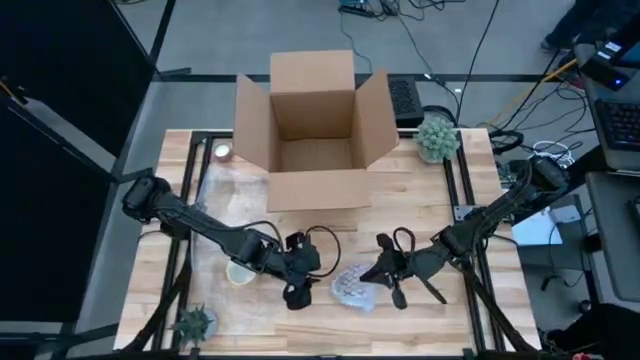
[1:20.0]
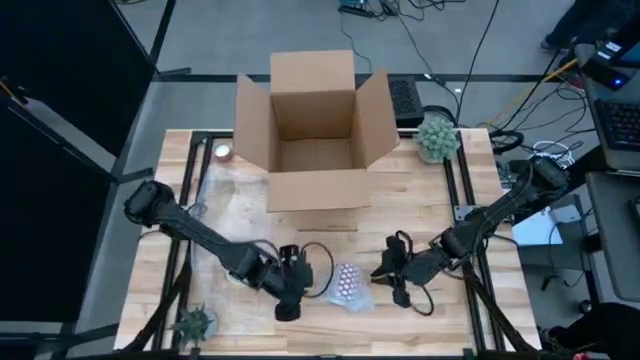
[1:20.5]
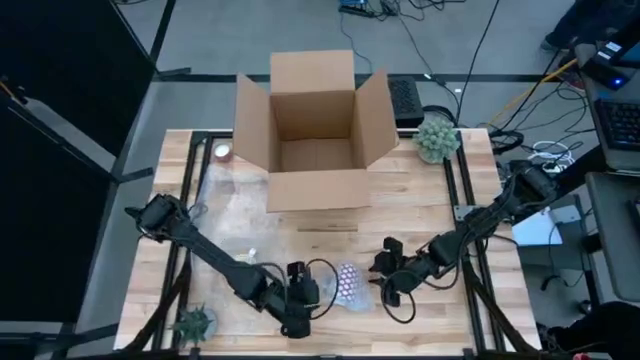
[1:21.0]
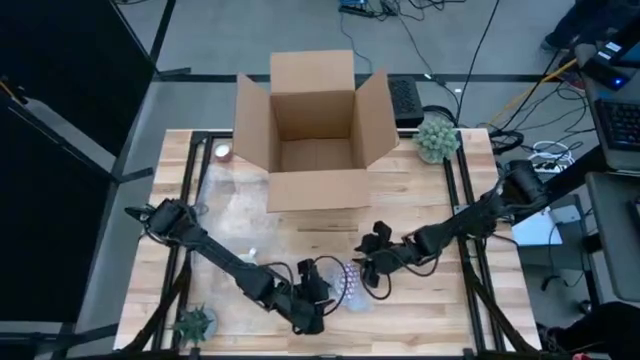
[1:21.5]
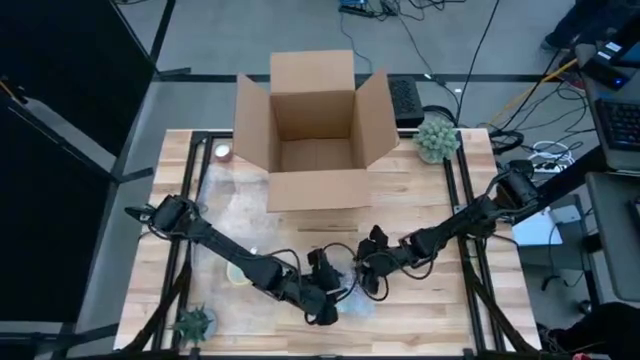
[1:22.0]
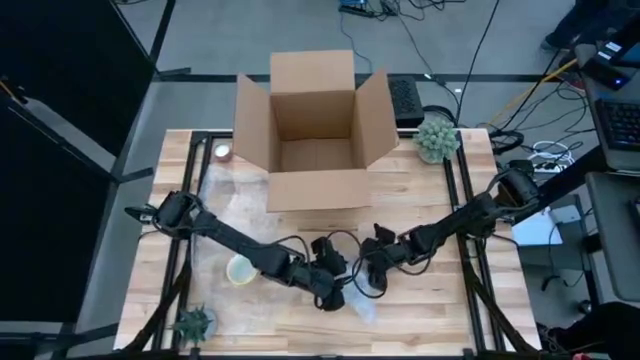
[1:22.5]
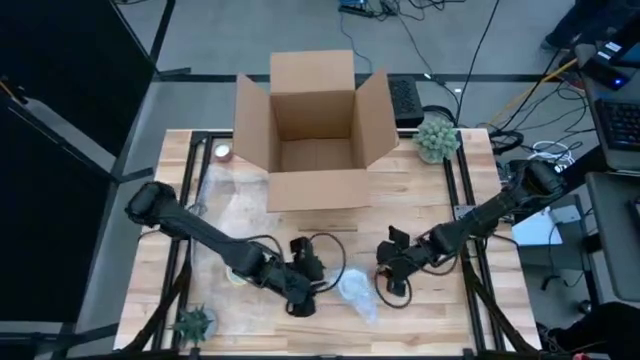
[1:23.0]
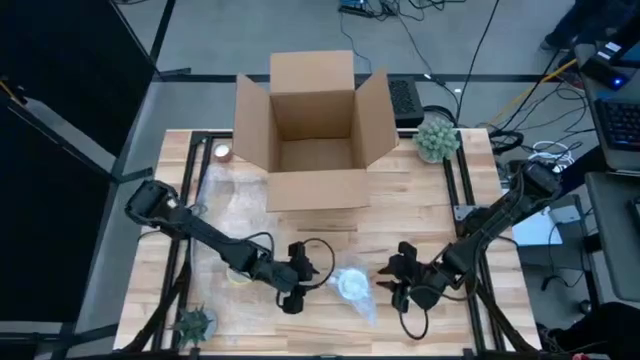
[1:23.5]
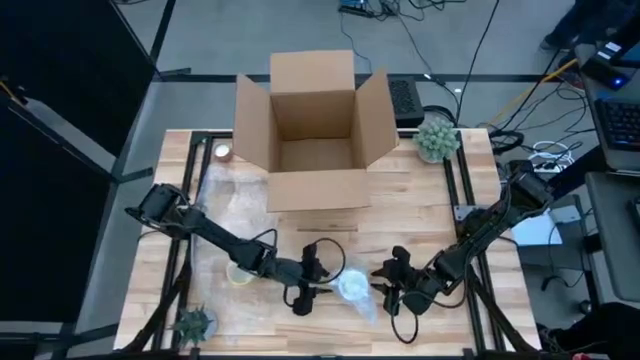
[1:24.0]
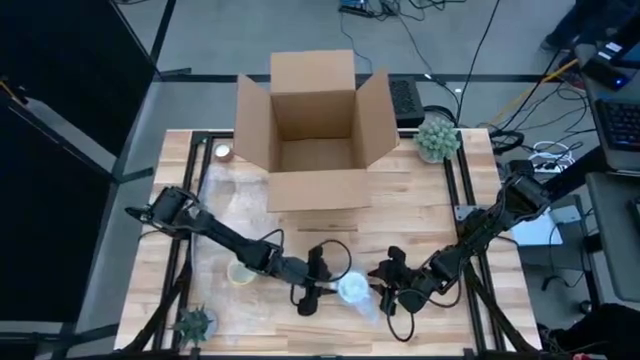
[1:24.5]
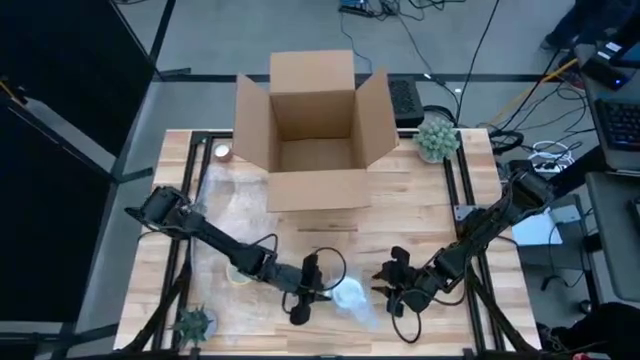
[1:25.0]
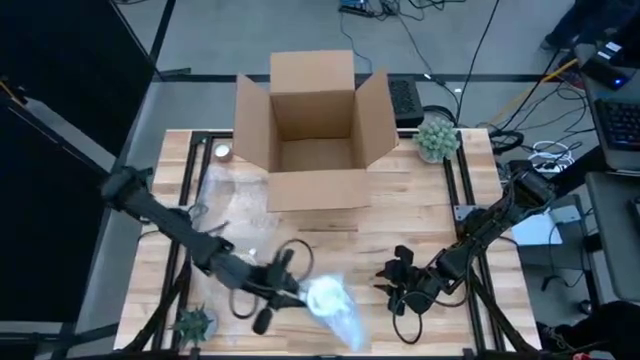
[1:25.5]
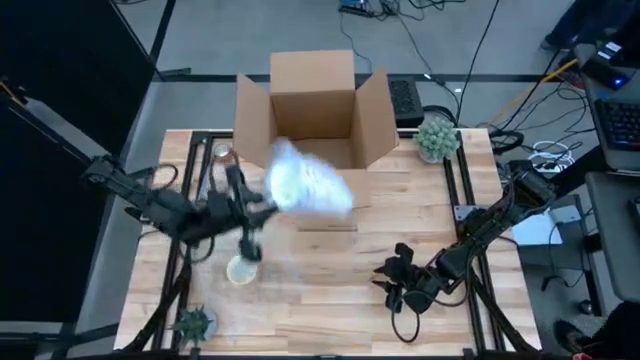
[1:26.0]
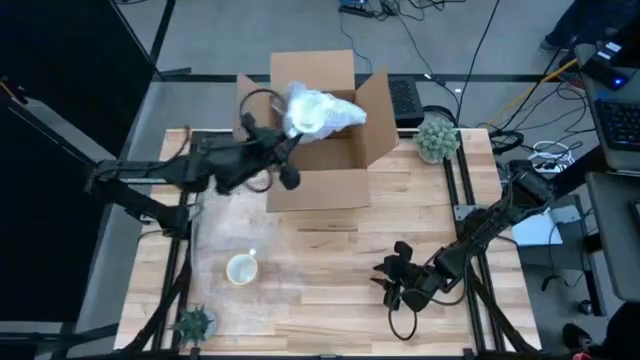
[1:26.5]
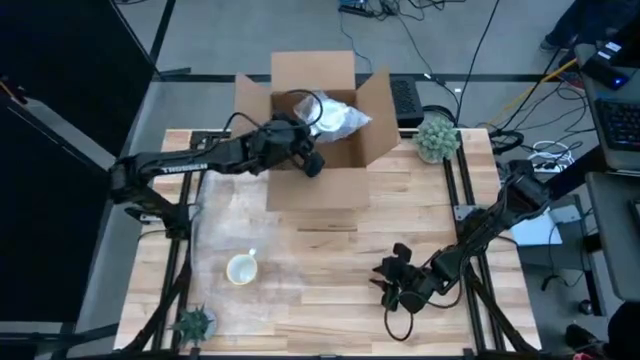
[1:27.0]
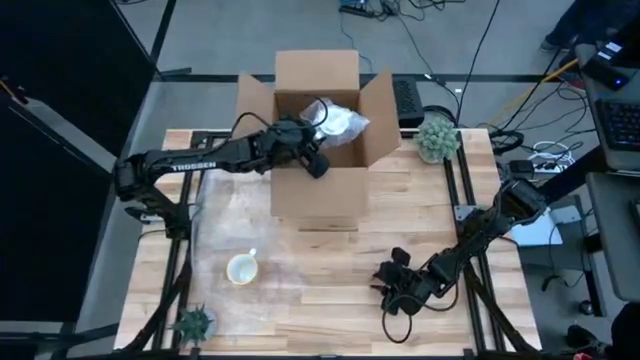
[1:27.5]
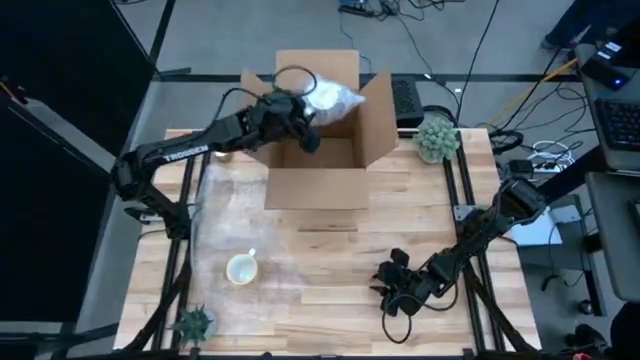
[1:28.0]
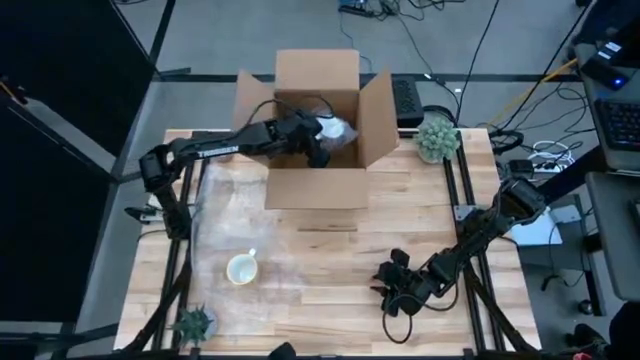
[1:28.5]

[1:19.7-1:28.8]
Task: wrap mug
Put the wrapped red mug into the box

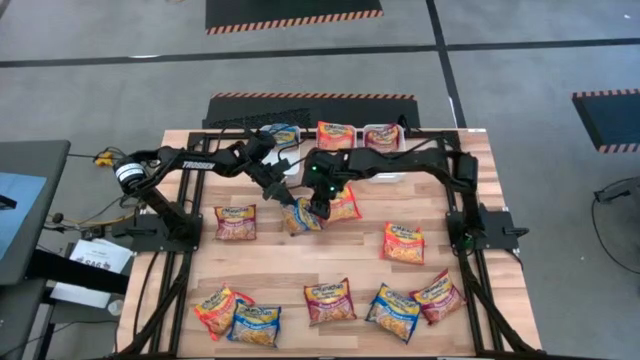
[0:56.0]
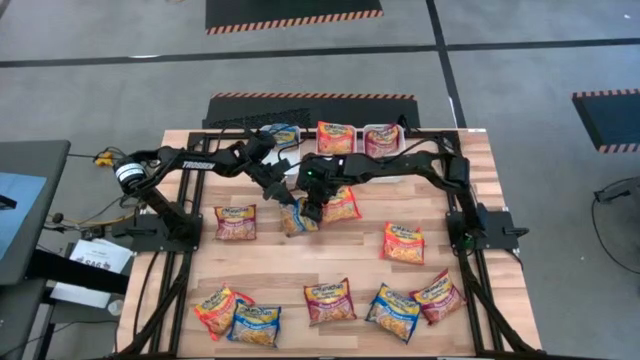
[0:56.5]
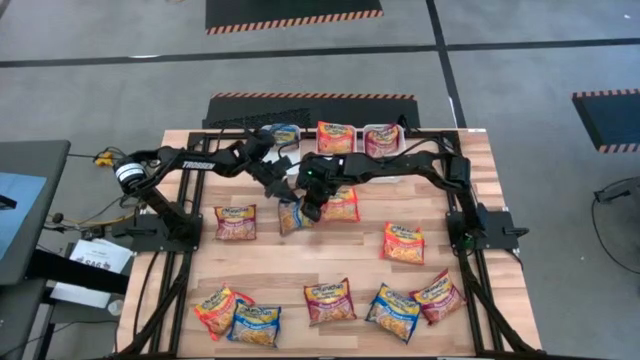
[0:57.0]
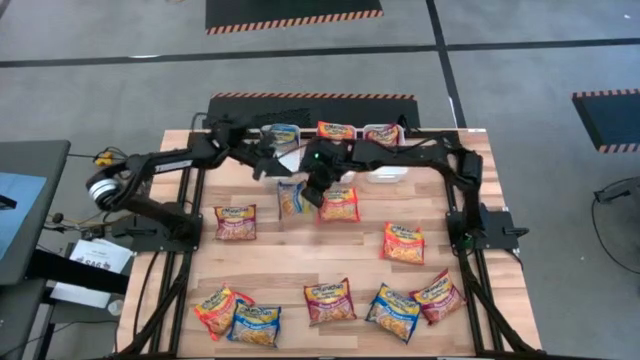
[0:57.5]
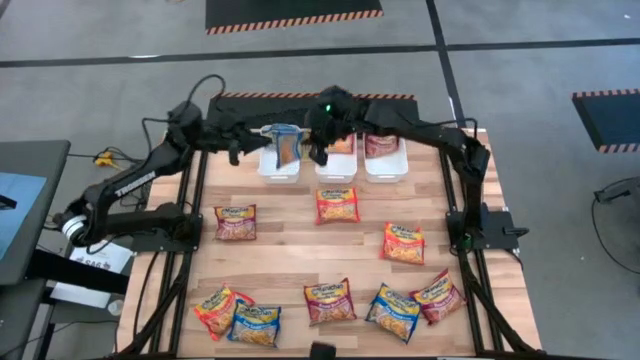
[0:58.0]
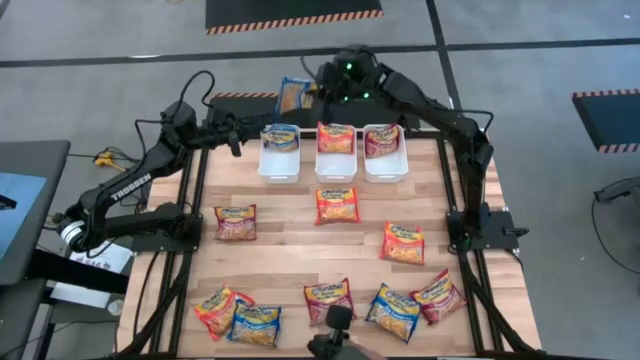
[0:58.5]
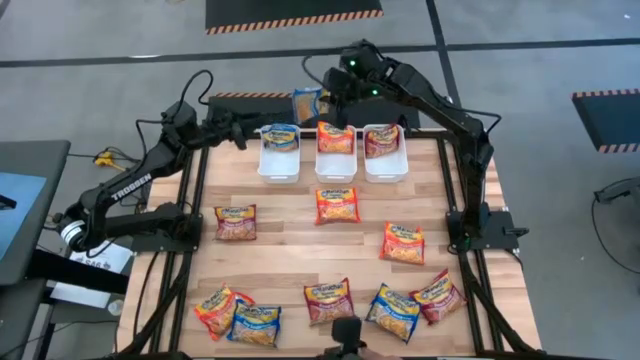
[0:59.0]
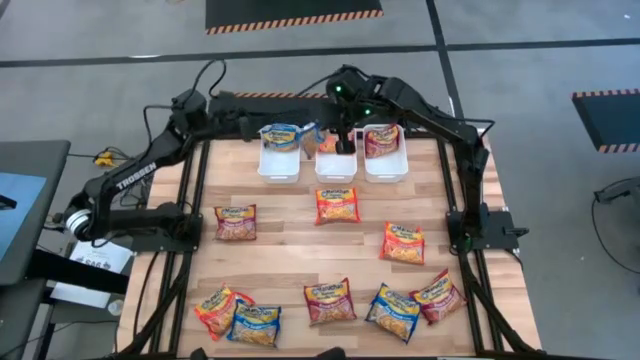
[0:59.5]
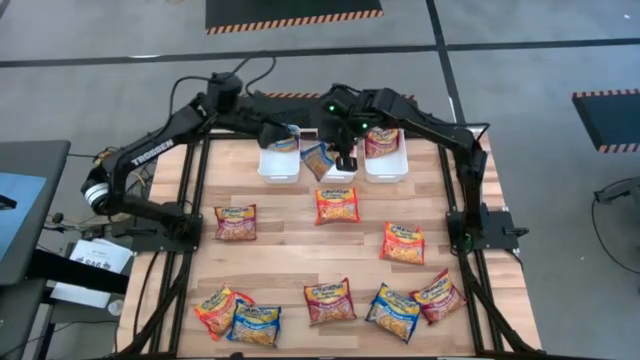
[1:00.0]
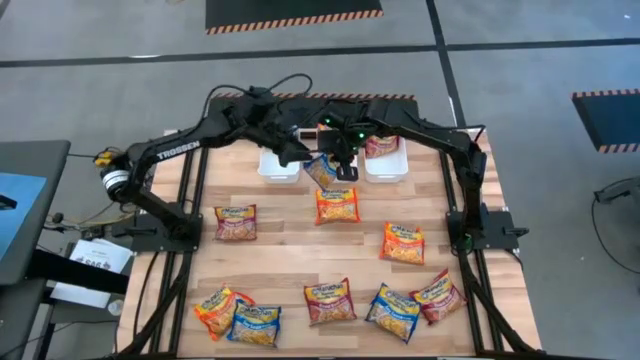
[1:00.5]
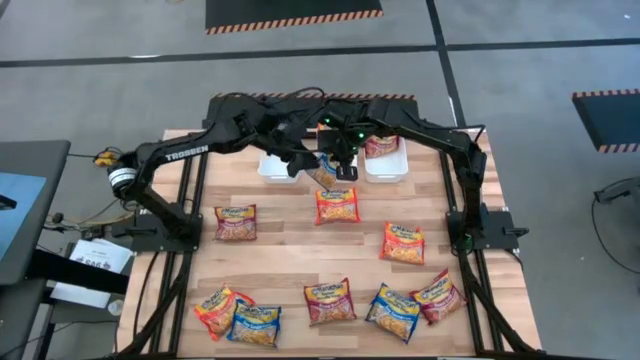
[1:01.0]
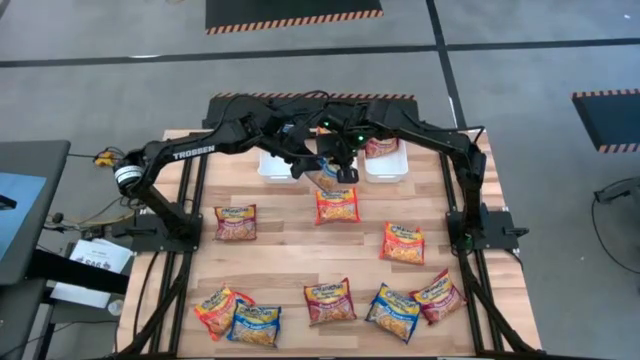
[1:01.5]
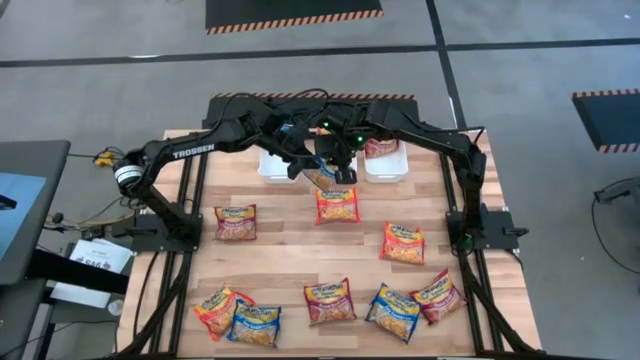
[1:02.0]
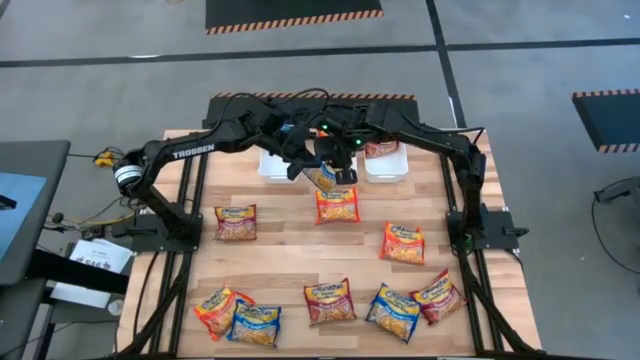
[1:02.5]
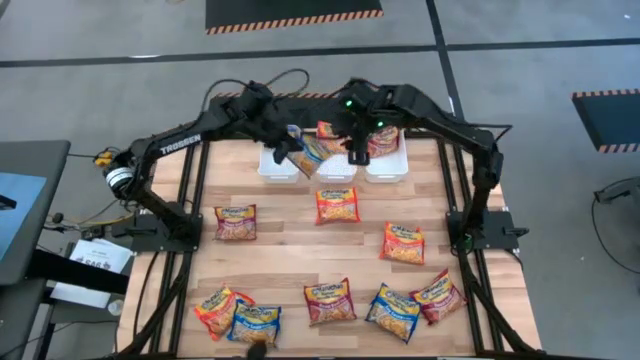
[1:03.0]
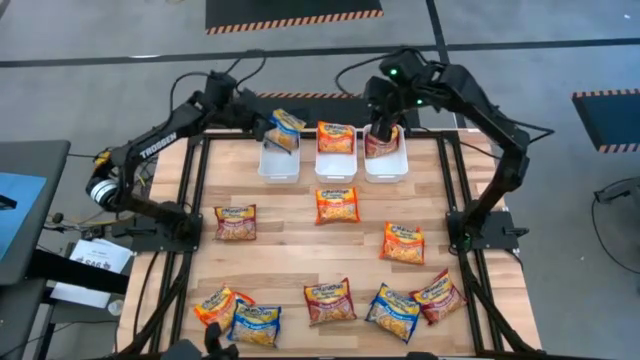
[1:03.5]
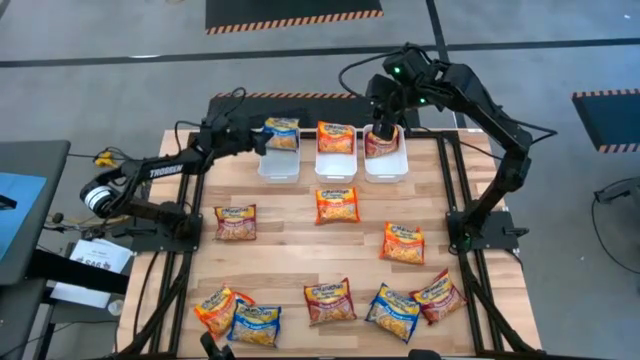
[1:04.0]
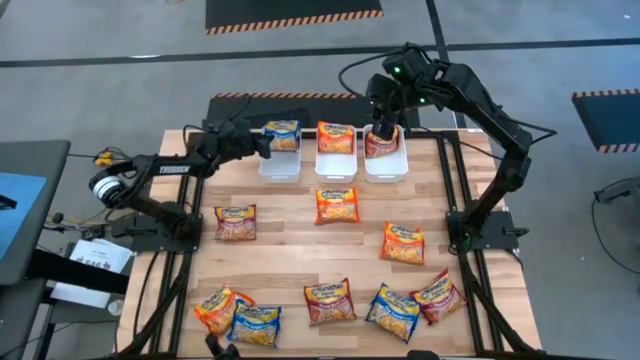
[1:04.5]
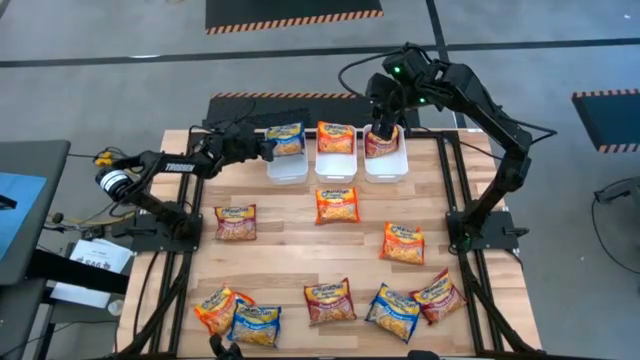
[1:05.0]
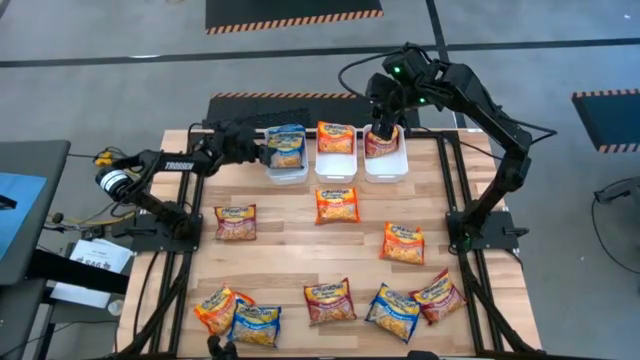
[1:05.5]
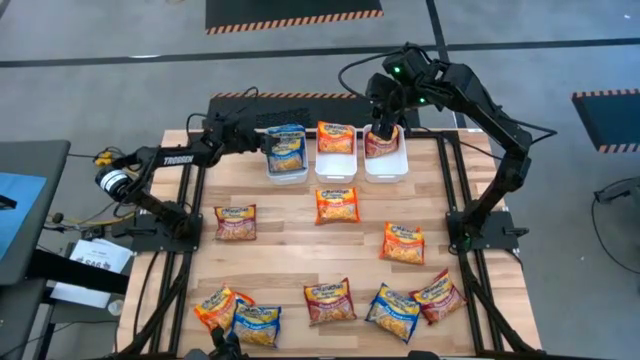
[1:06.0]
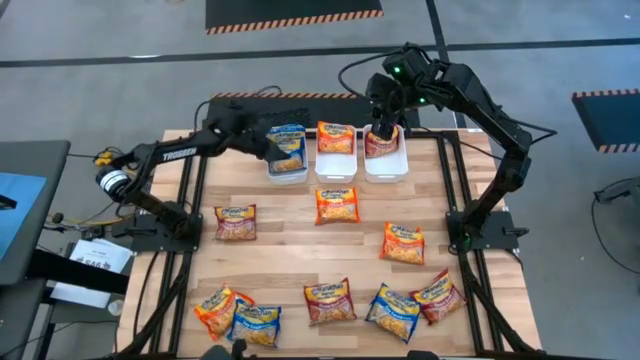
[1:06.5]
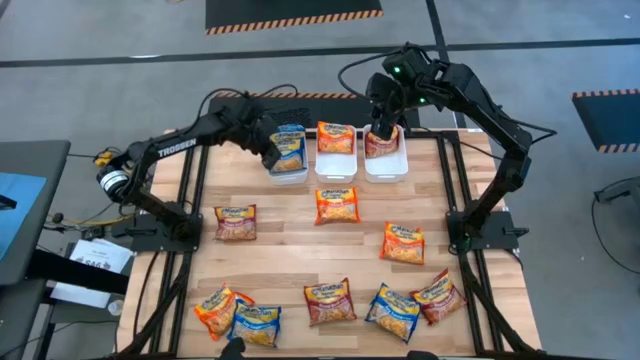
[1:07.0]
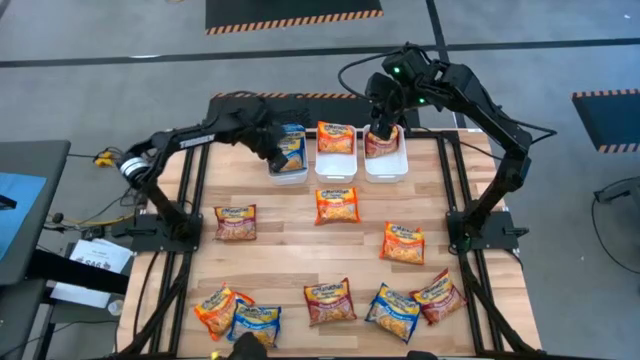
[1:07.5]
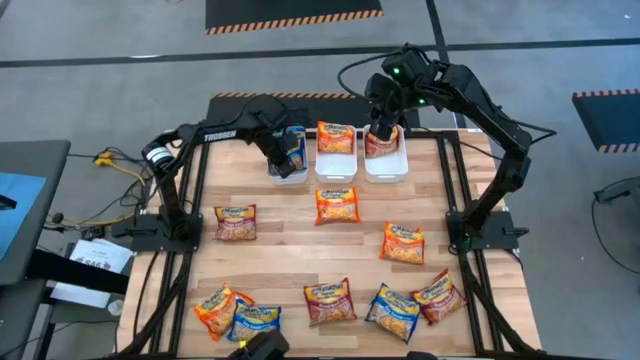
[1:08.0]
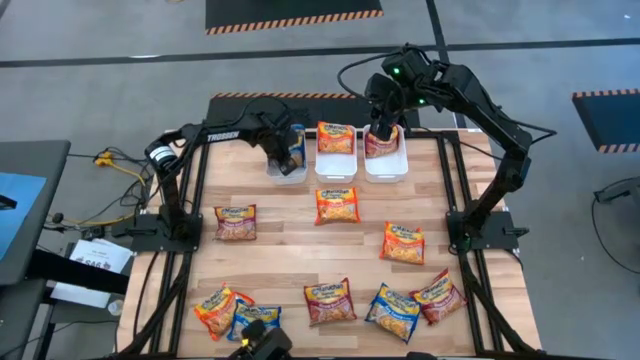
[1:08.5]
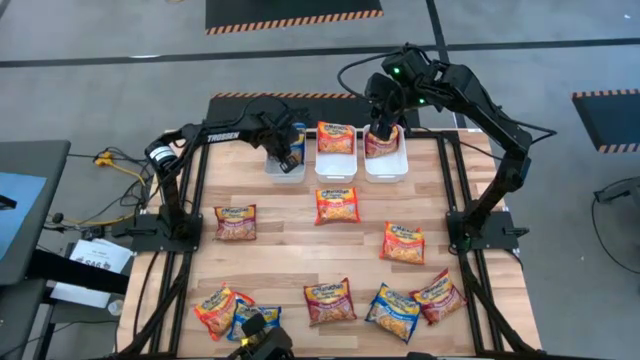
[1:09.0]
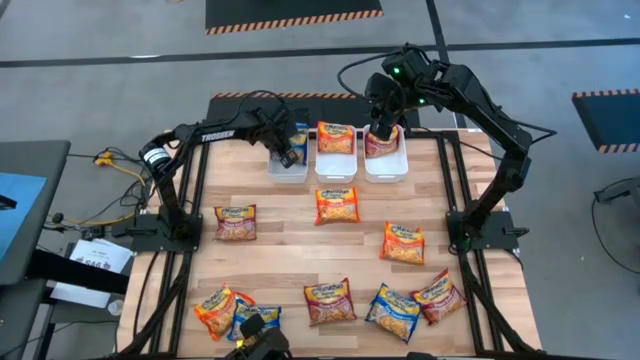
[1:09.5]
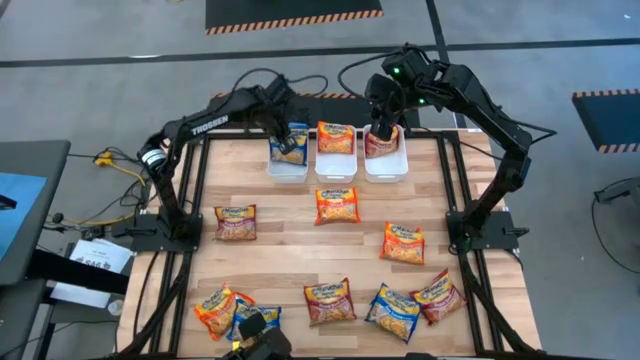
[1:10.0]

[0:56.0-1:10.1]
Task: Sort Maruchan noodles
Put the blue noodle pack into the left white bin
